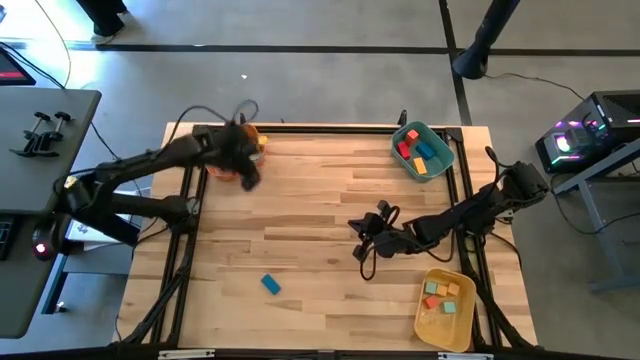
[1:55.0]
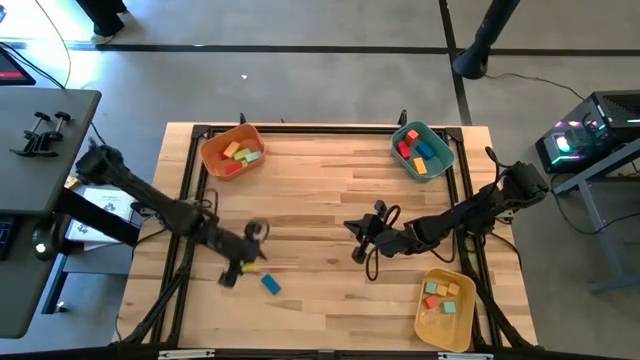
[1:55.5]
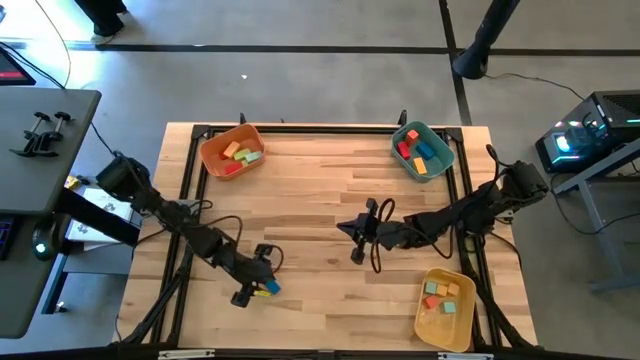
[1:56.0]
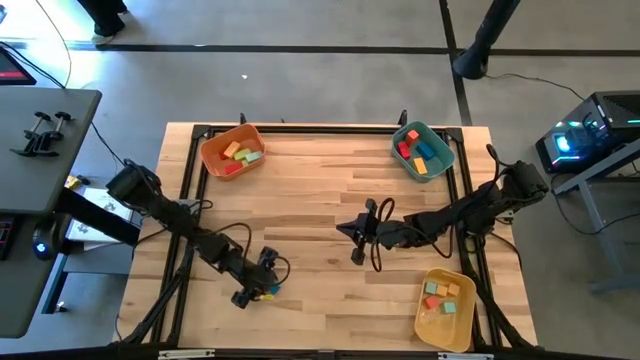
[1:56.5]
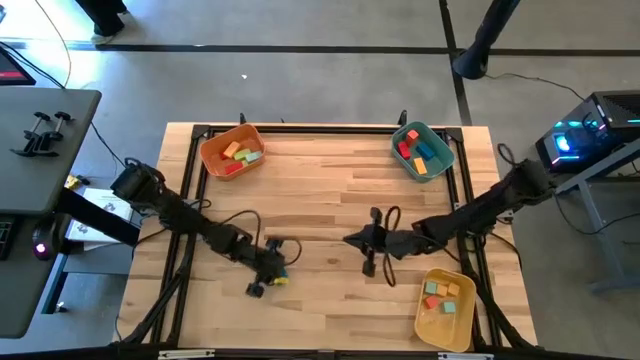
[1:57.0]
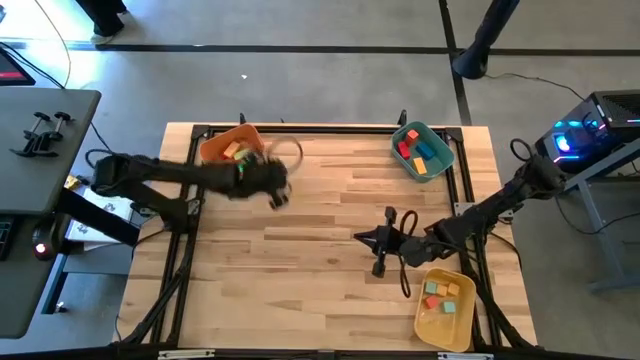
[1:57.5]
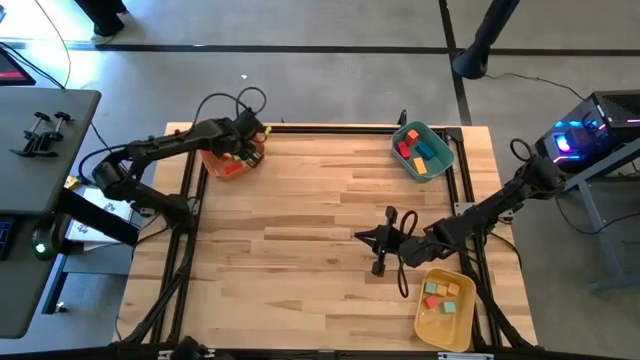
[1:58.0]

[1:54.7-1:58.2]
Task: Sort blocks by size
Put the thin blue rectangular block into the orange bin

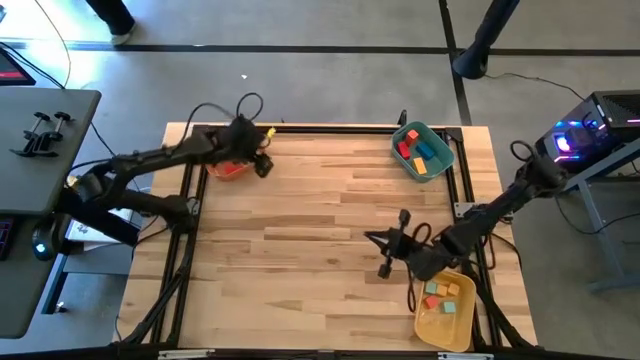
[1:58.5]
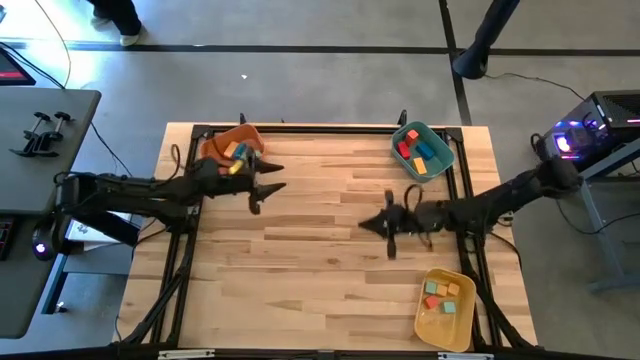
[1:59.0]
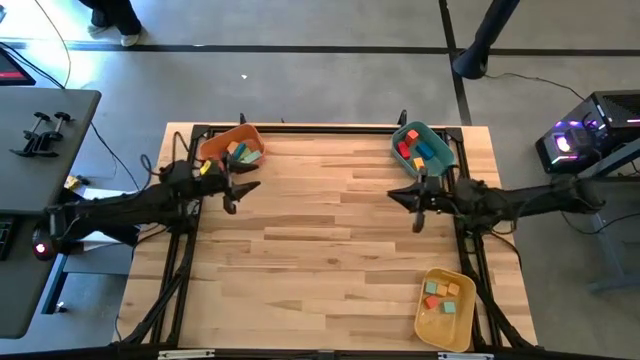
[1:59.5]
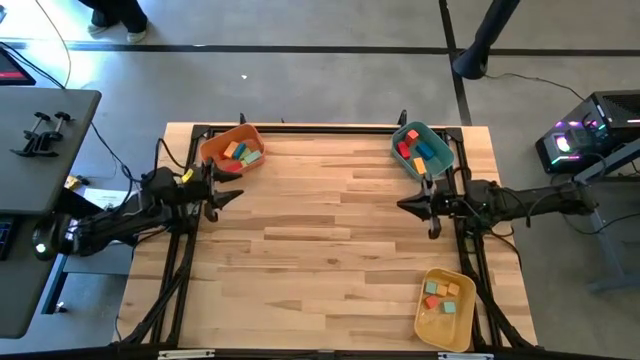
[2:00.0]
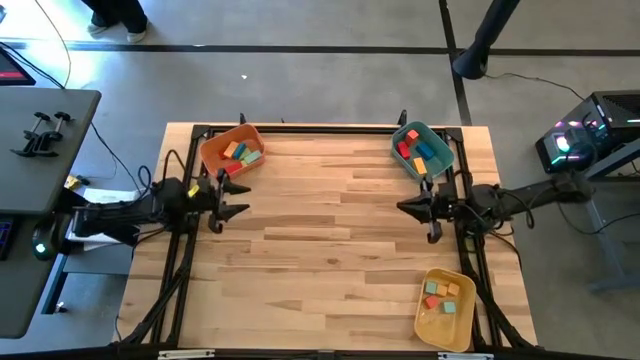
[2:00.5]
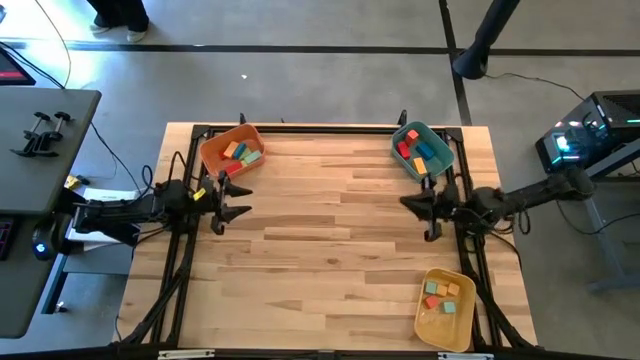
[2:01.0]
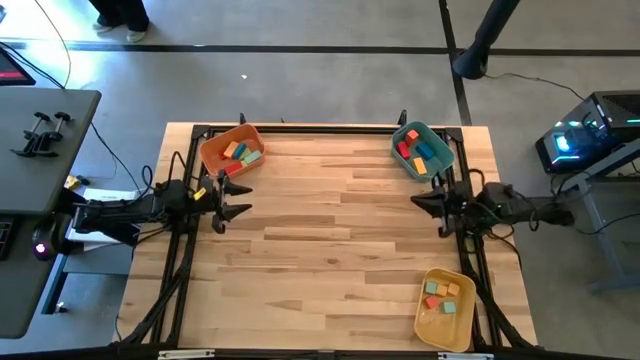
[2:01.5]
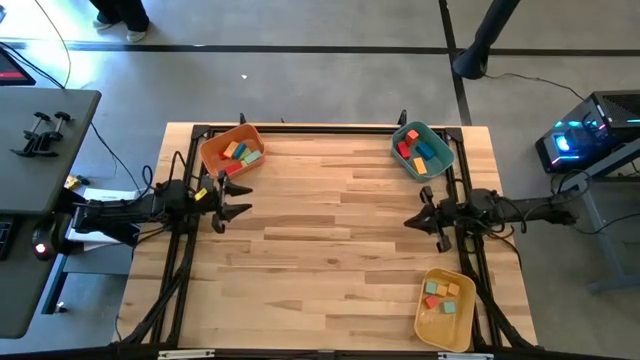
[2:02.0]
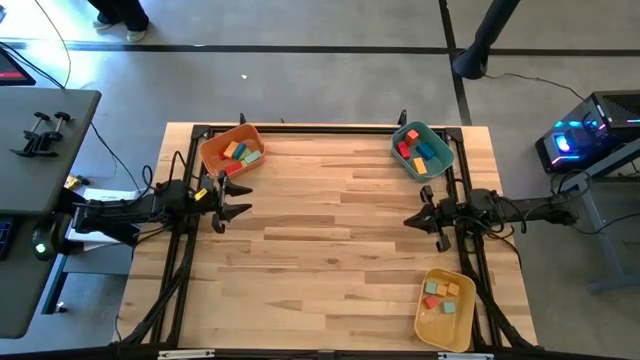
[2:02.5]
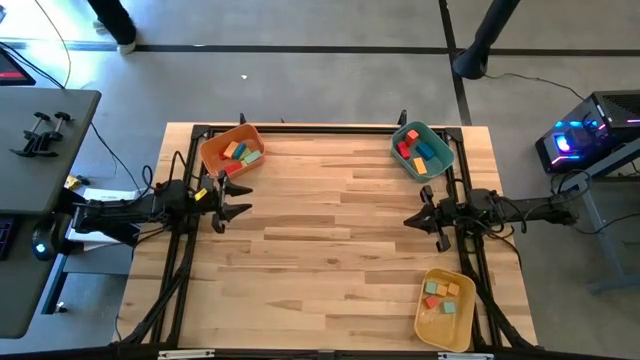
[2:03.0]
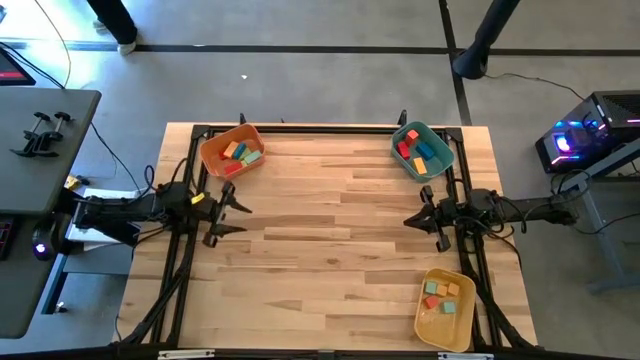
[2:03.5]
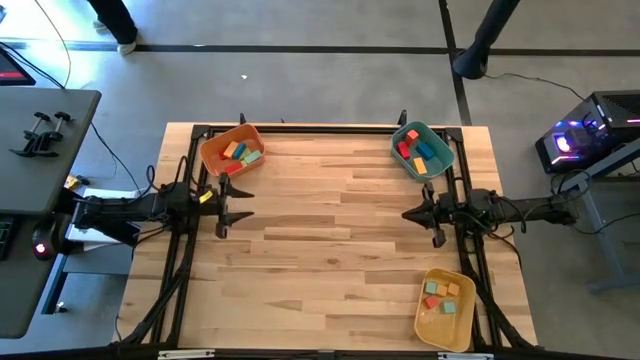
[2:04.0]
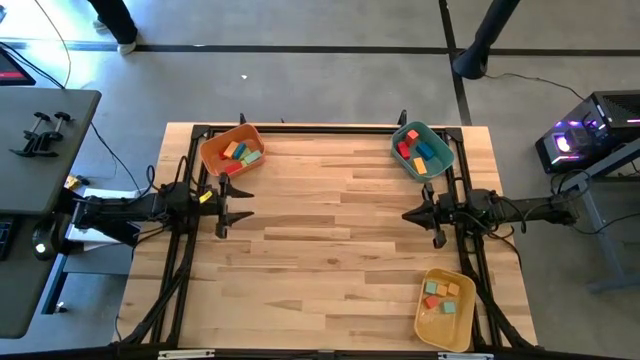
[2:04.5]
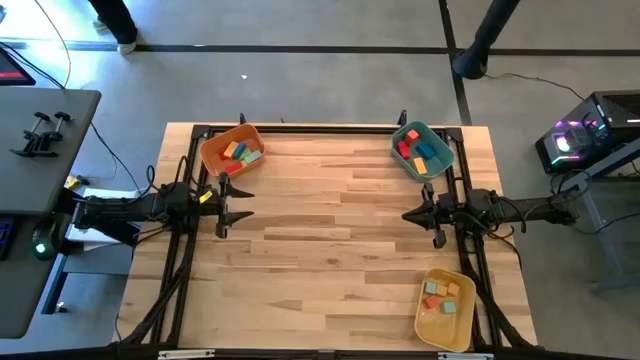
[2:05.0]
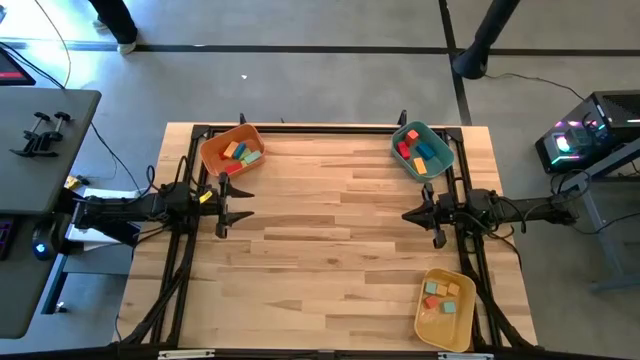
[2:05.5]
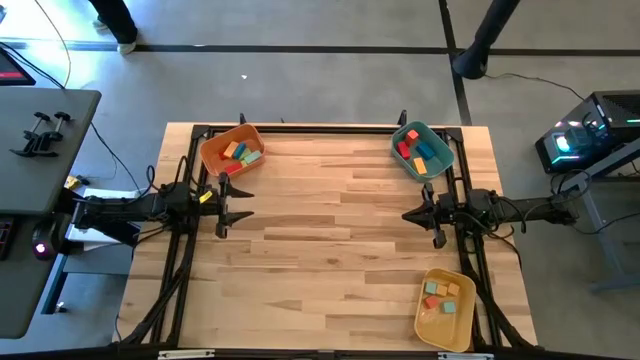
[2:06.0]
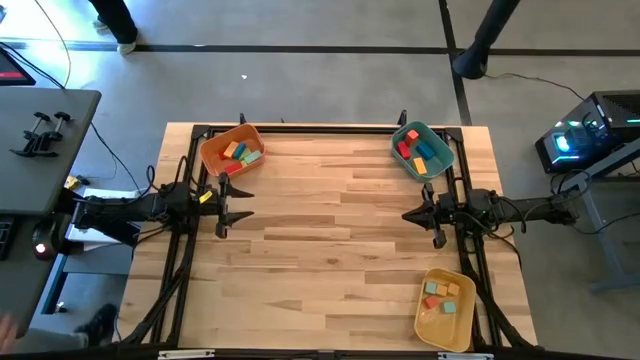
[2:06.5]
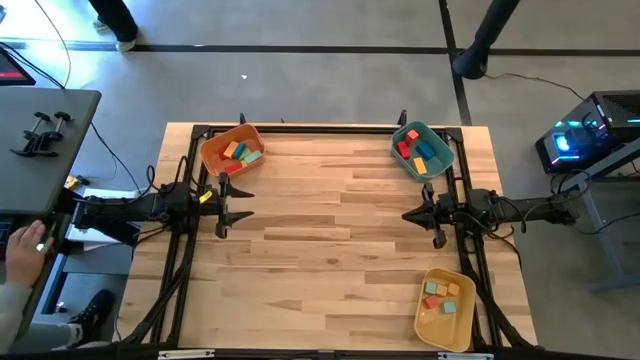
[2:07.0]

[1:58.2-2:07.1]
Return to Home Position

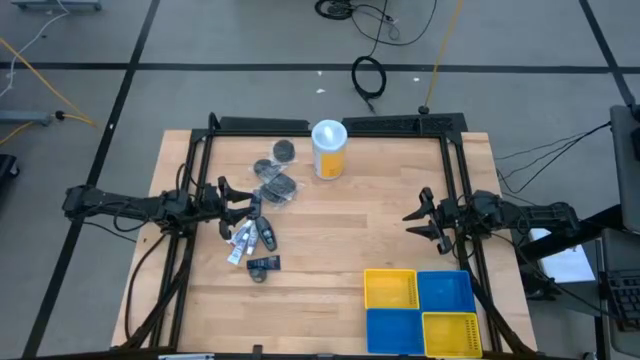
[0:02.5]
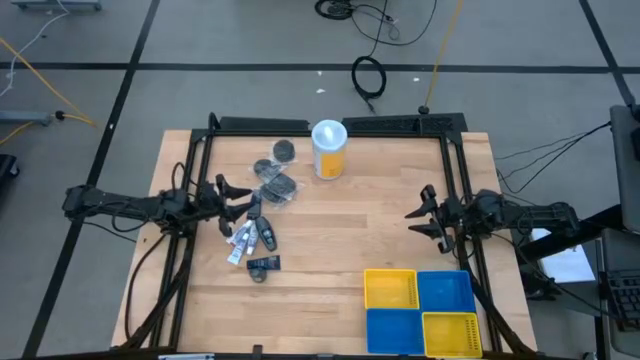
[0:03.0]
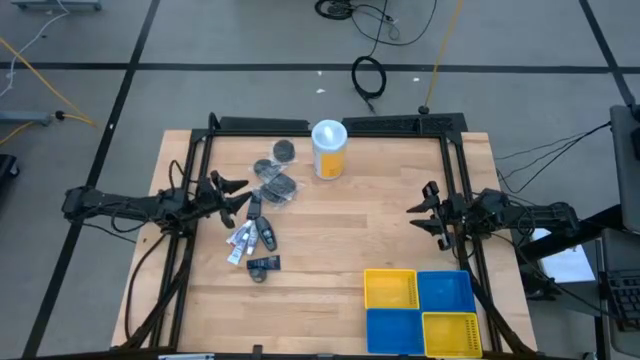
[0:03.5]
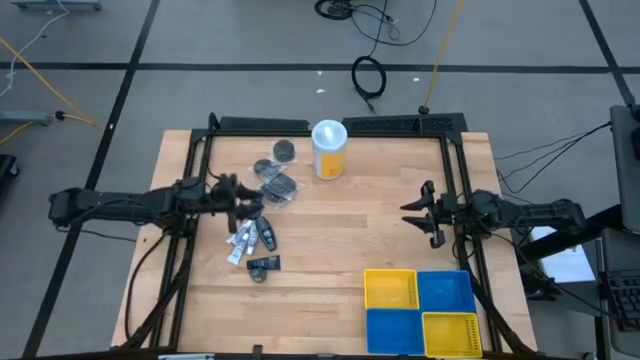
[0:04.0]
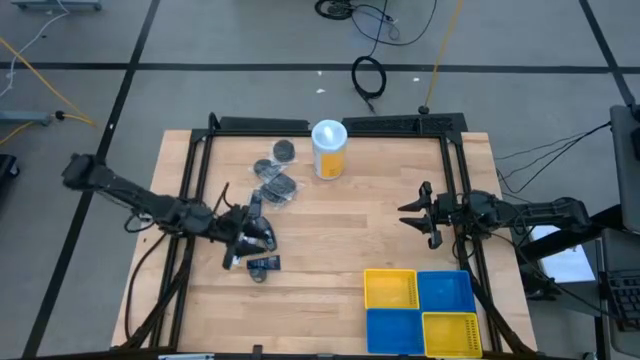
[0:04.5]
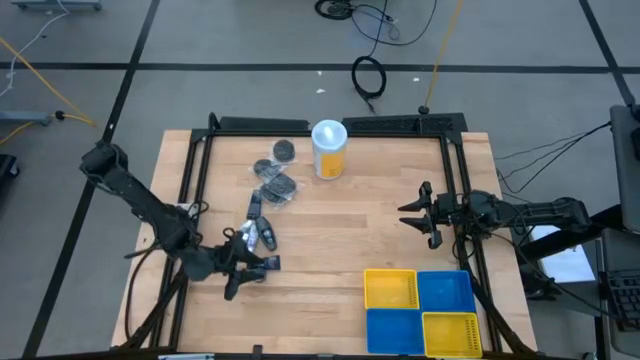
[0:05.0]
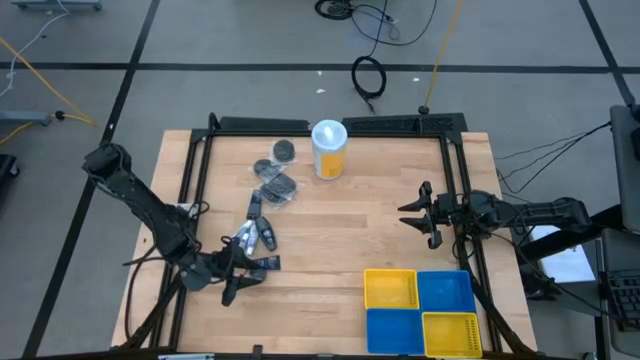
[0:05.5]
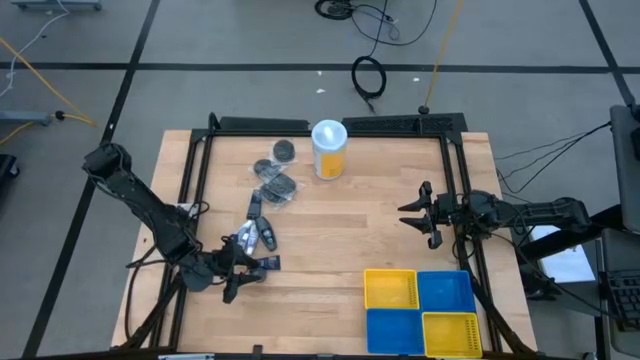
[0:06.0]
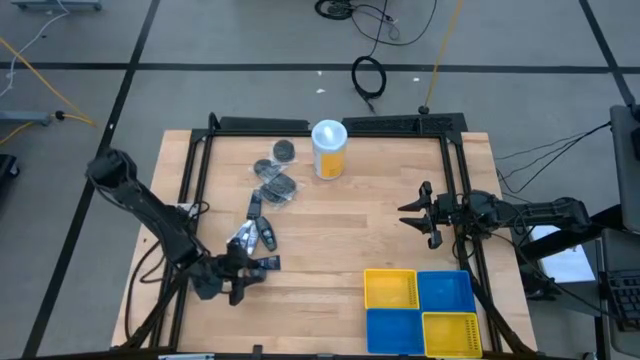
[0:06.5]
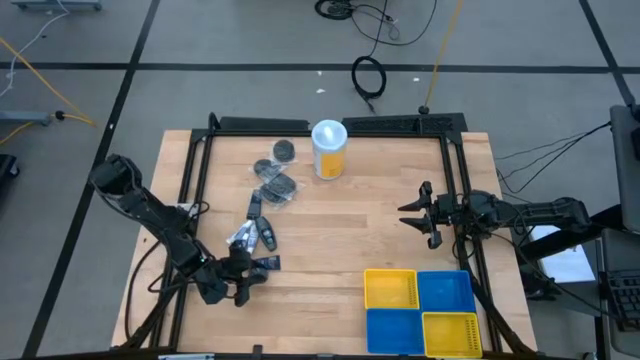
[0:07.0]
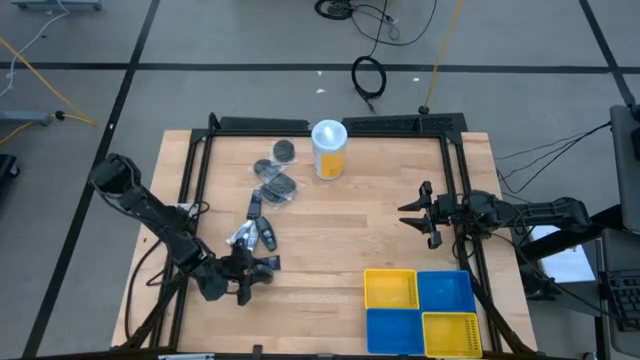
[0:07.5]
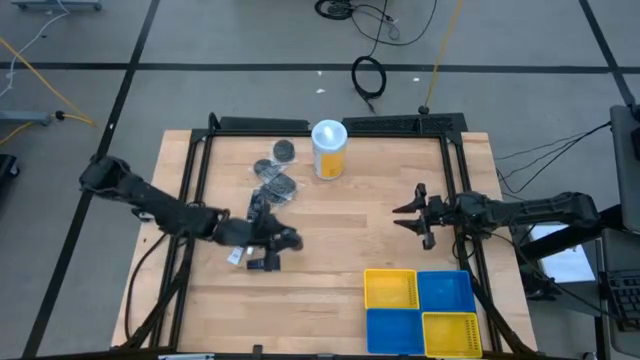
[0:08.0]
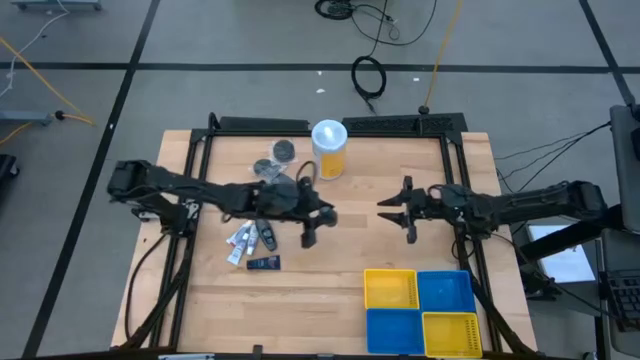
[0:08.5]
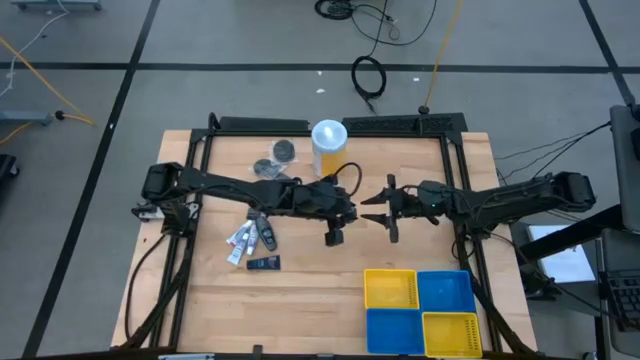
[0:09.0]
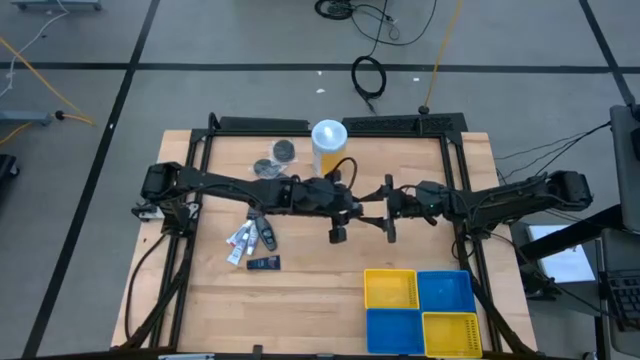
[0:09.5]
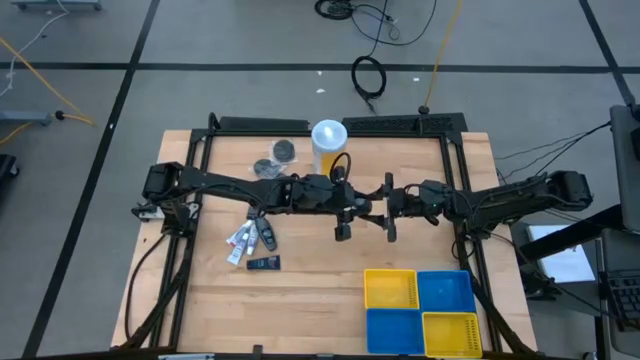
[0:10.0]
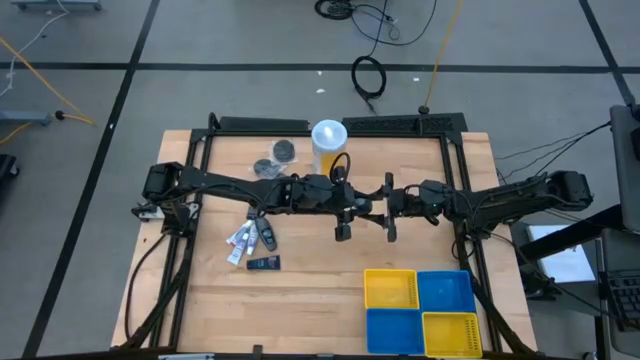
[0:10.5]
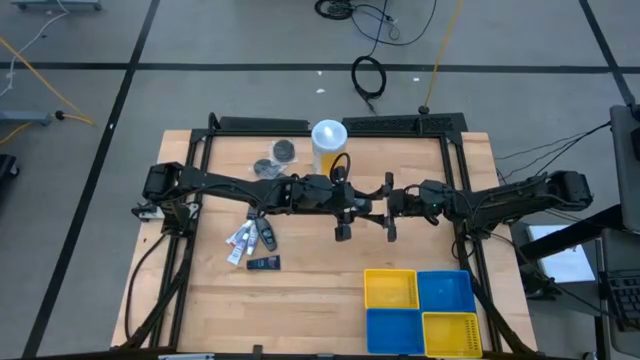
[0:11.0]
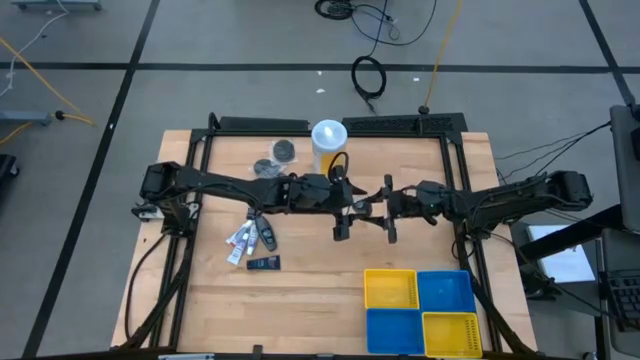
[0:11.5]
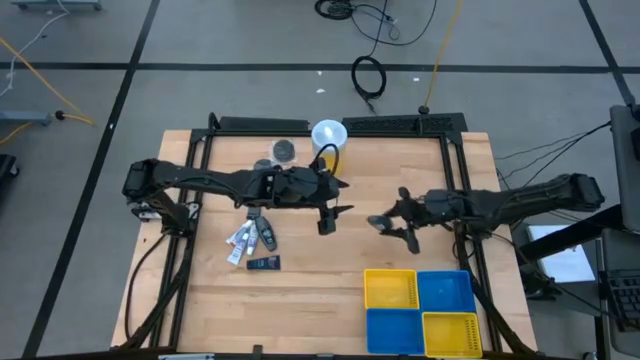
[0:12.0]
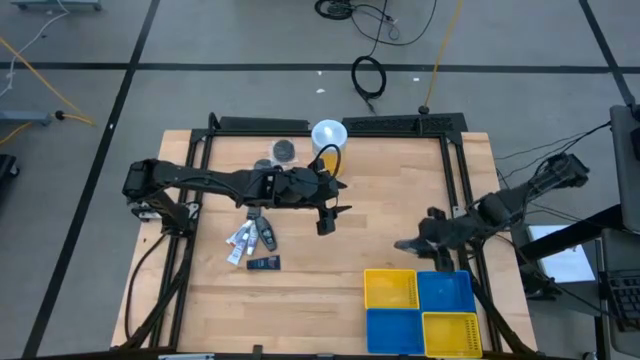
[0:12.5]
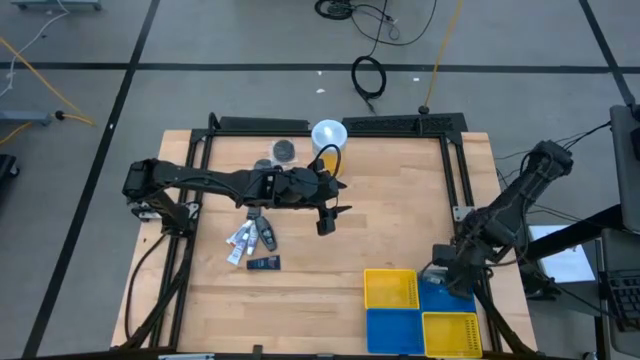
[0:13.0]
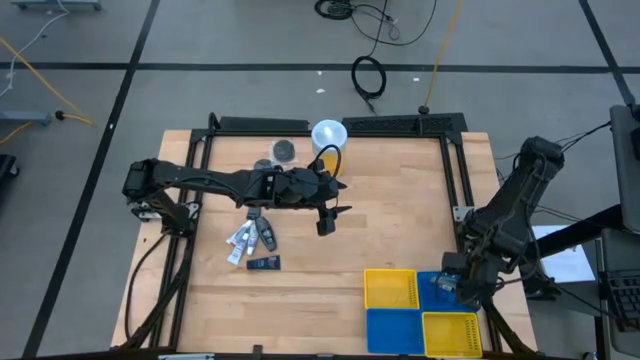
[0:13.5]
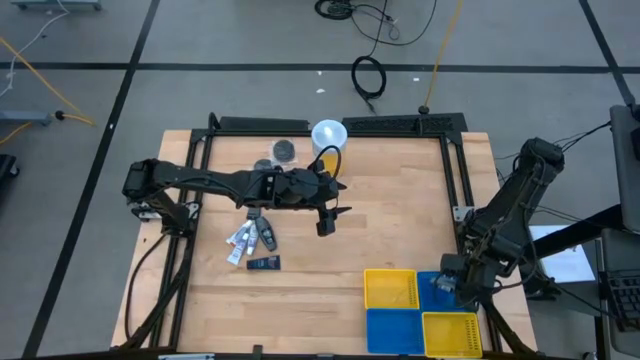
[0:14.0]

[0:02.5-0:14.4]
Task: Pick & Place Travel size toiletries
Put the bottom deodorant into the top blue basket
